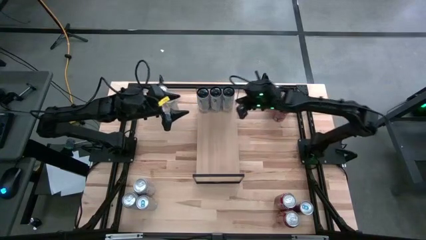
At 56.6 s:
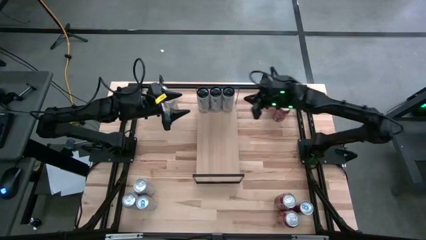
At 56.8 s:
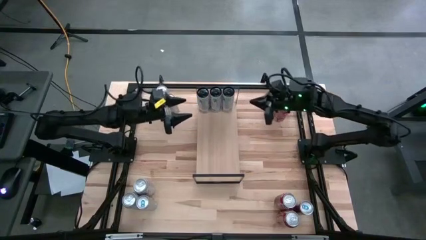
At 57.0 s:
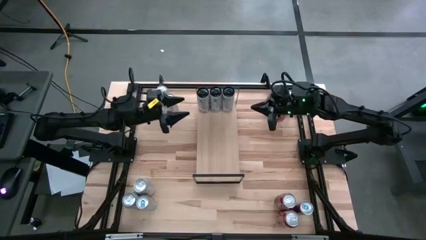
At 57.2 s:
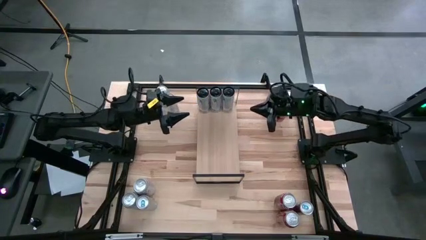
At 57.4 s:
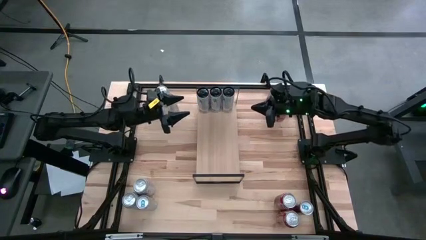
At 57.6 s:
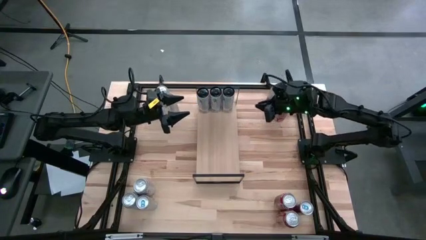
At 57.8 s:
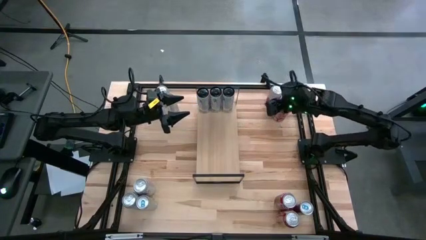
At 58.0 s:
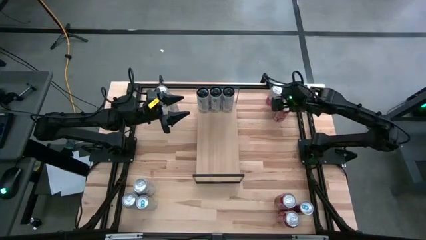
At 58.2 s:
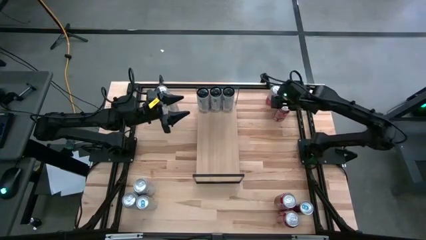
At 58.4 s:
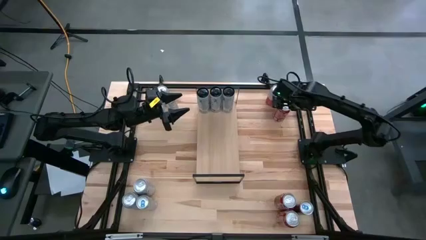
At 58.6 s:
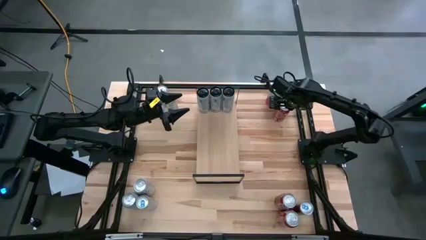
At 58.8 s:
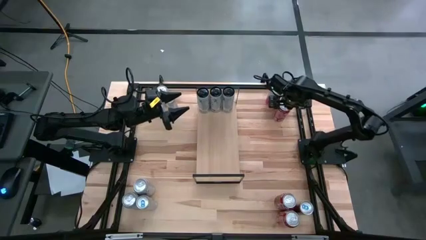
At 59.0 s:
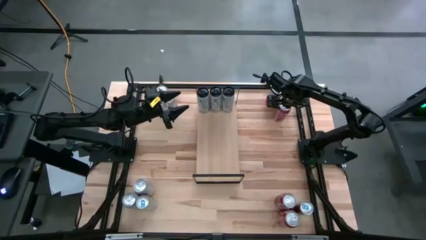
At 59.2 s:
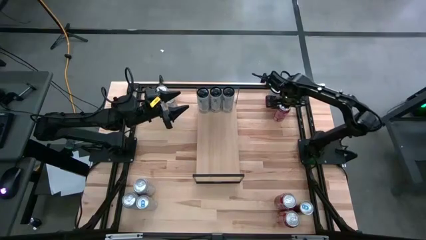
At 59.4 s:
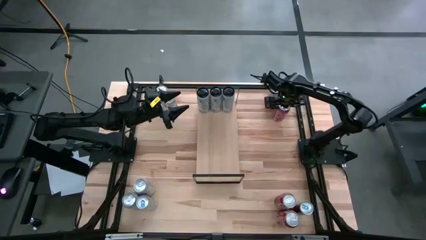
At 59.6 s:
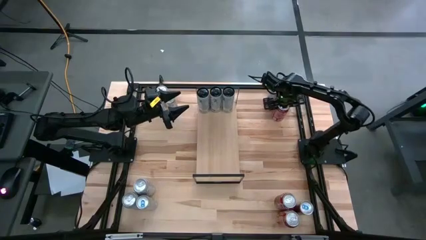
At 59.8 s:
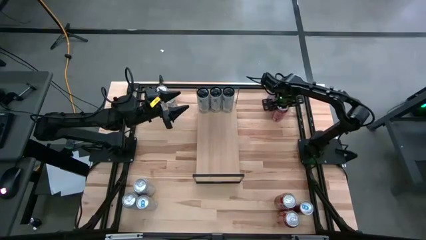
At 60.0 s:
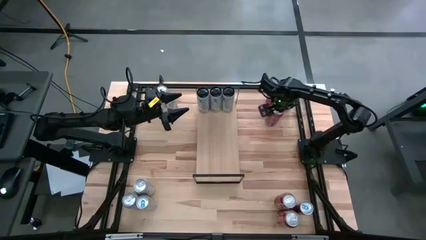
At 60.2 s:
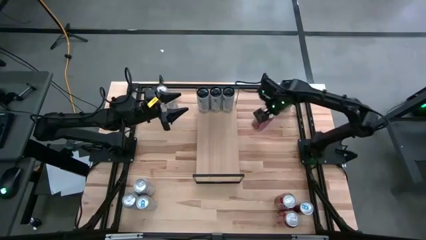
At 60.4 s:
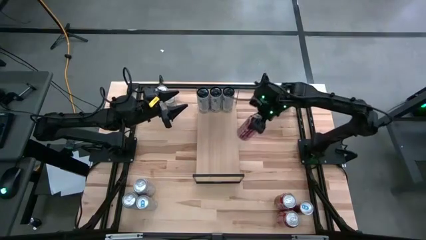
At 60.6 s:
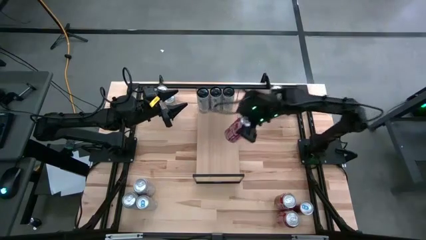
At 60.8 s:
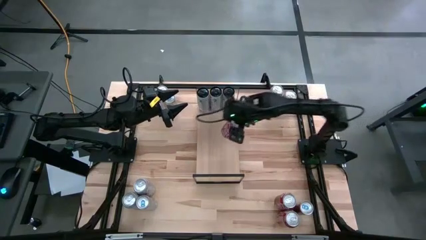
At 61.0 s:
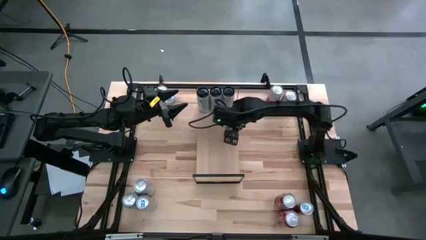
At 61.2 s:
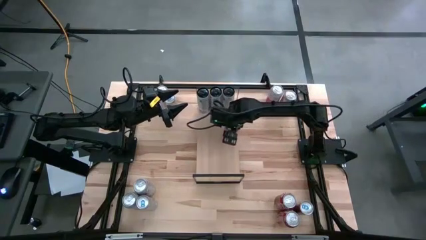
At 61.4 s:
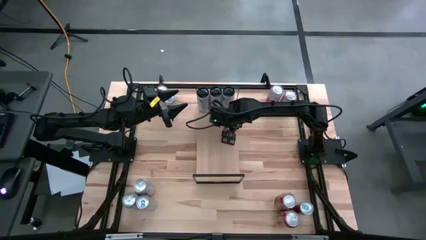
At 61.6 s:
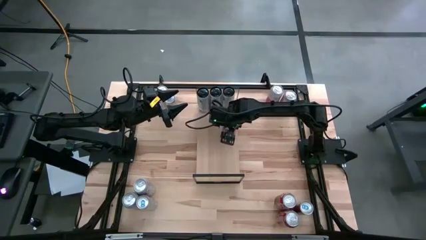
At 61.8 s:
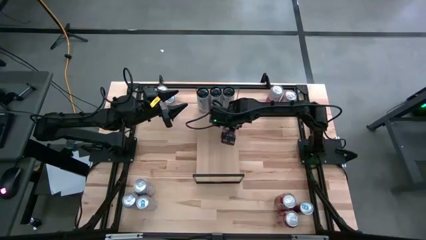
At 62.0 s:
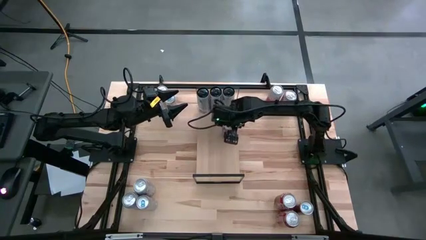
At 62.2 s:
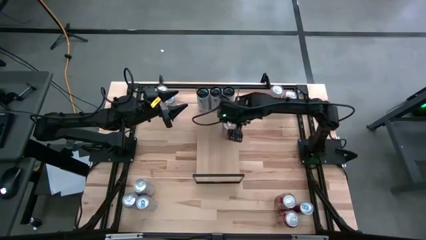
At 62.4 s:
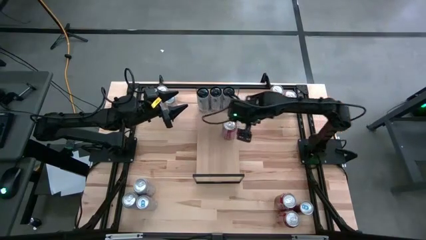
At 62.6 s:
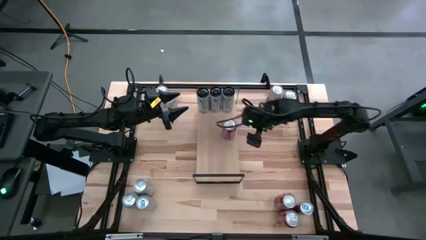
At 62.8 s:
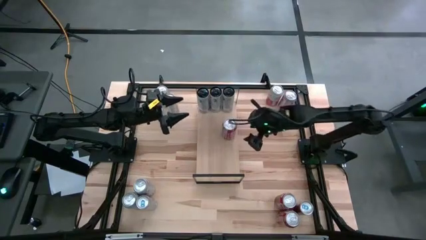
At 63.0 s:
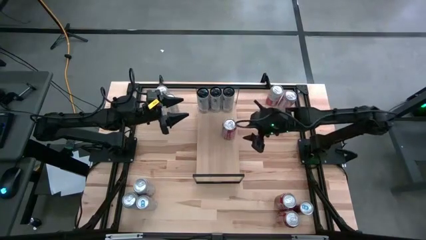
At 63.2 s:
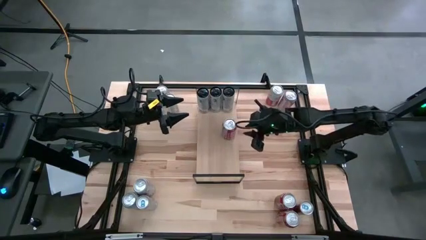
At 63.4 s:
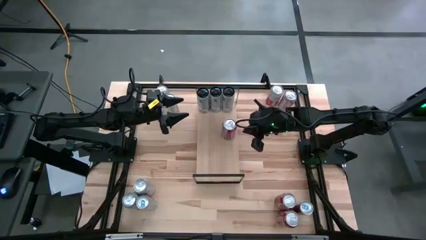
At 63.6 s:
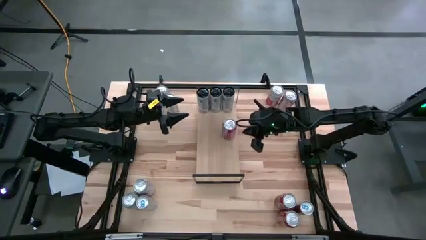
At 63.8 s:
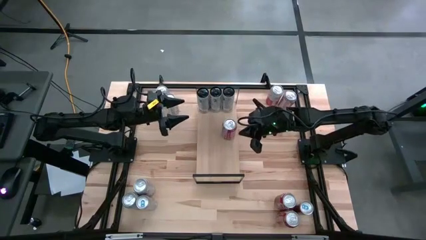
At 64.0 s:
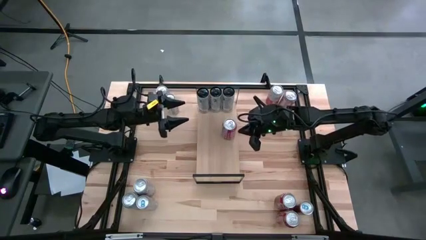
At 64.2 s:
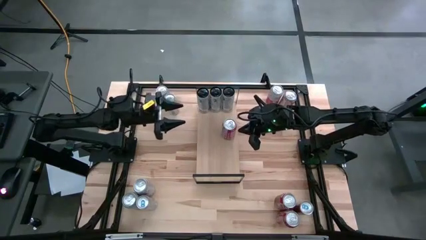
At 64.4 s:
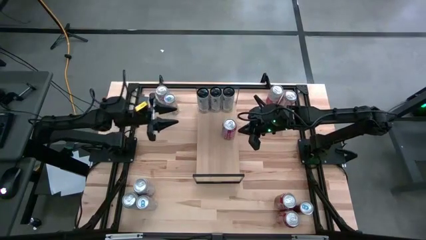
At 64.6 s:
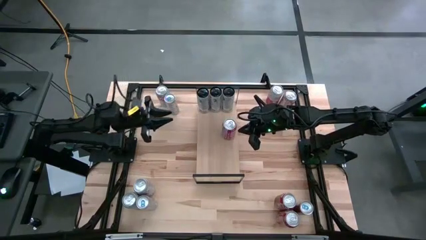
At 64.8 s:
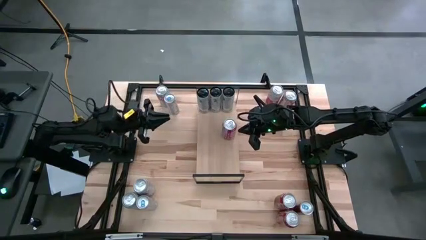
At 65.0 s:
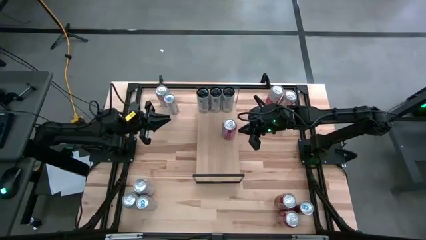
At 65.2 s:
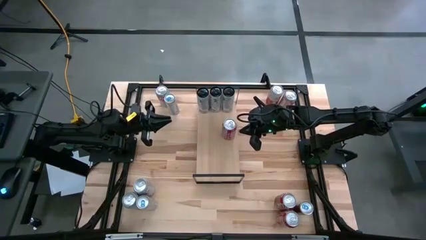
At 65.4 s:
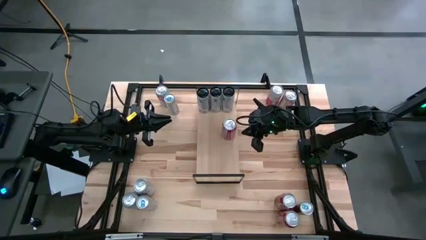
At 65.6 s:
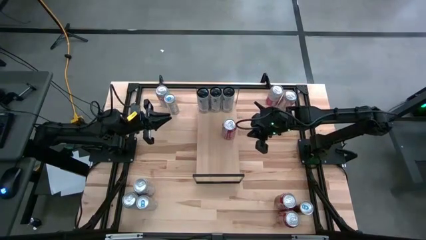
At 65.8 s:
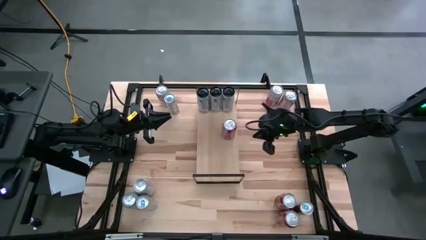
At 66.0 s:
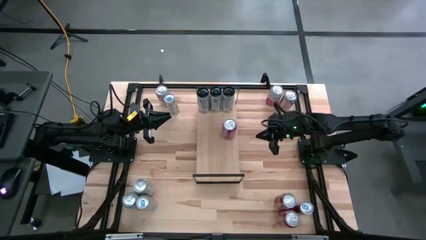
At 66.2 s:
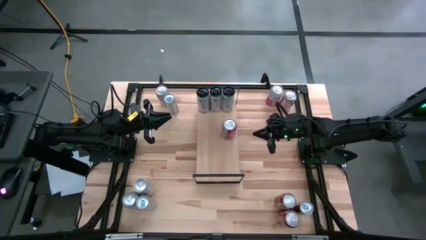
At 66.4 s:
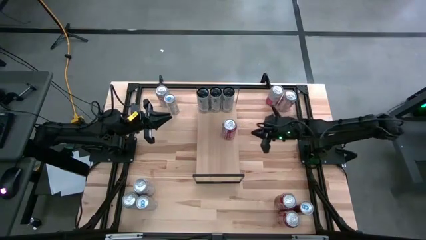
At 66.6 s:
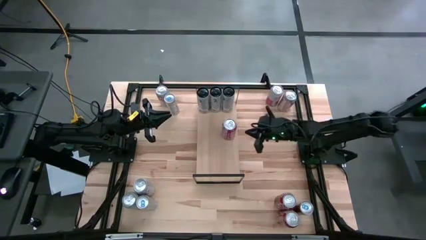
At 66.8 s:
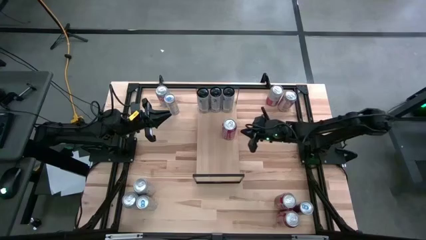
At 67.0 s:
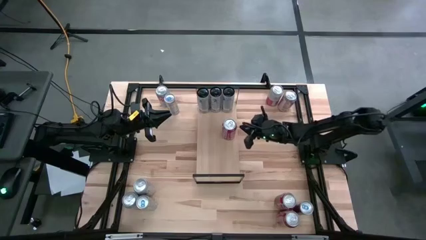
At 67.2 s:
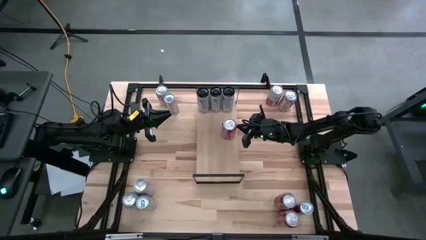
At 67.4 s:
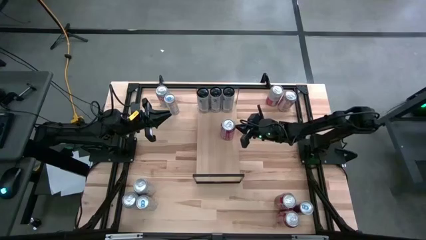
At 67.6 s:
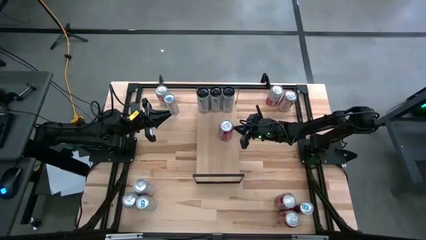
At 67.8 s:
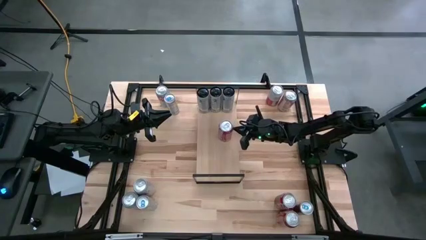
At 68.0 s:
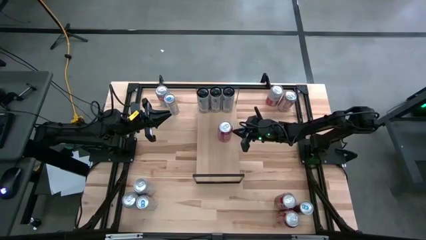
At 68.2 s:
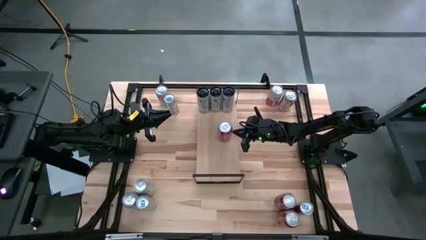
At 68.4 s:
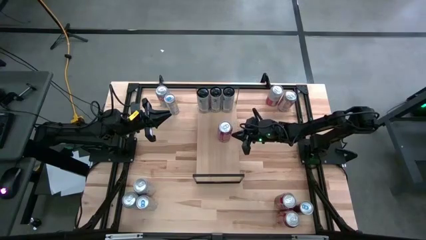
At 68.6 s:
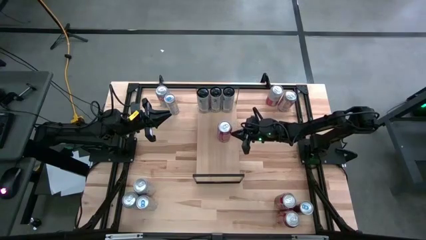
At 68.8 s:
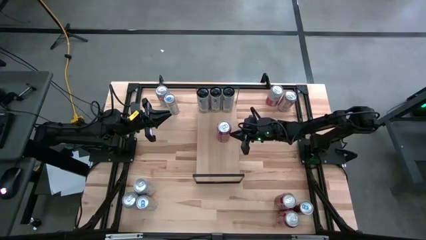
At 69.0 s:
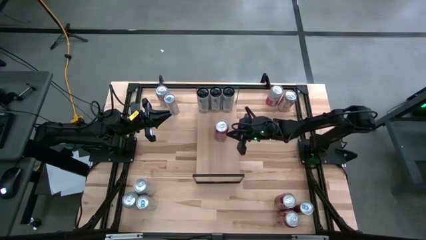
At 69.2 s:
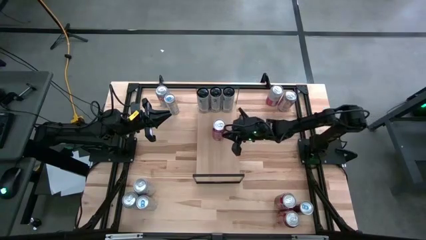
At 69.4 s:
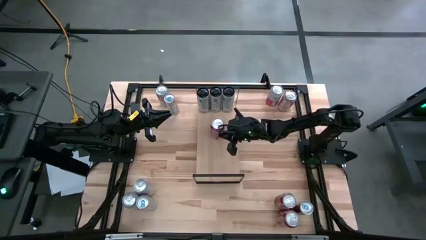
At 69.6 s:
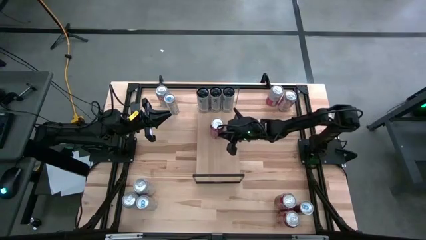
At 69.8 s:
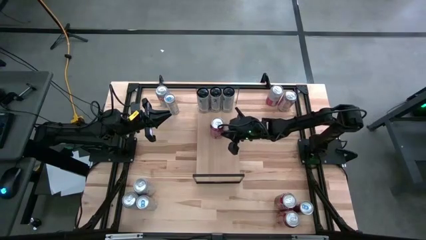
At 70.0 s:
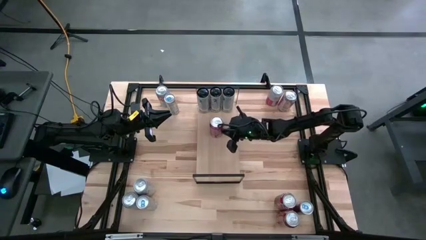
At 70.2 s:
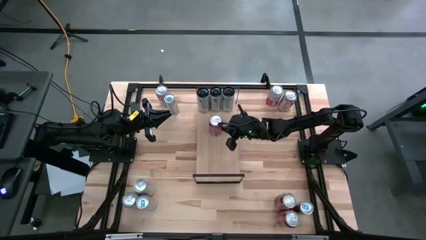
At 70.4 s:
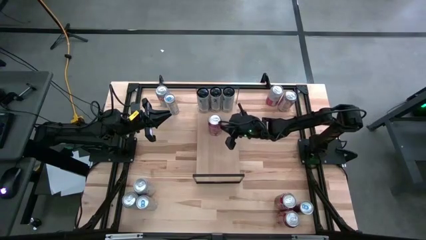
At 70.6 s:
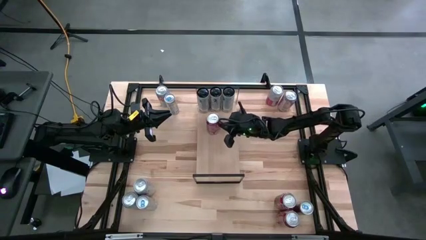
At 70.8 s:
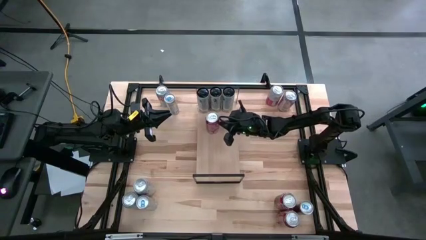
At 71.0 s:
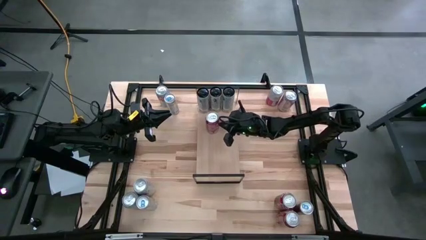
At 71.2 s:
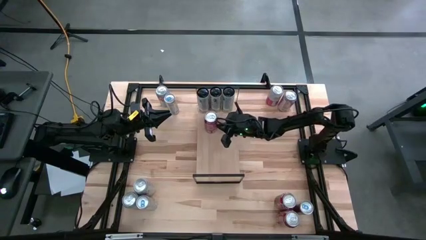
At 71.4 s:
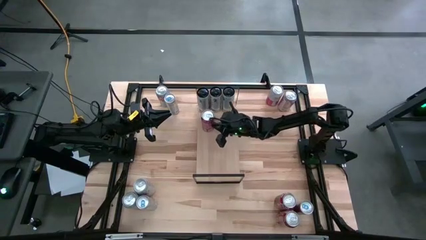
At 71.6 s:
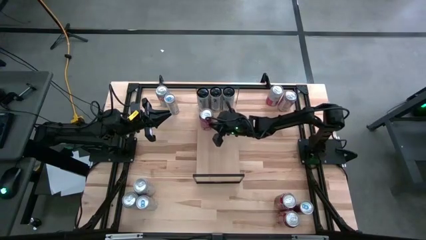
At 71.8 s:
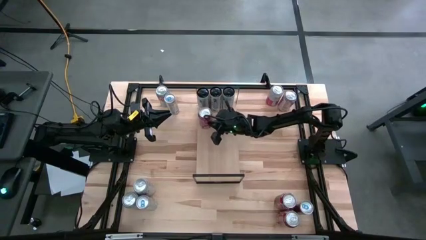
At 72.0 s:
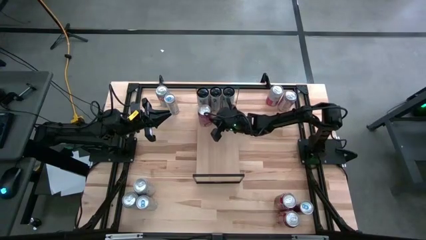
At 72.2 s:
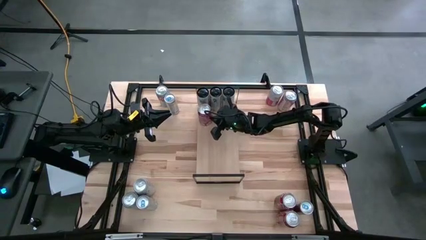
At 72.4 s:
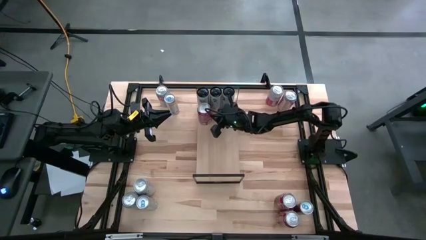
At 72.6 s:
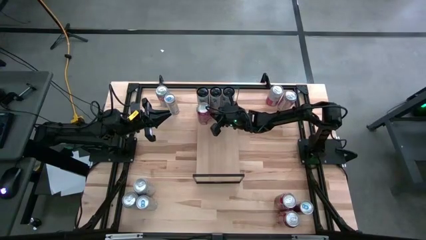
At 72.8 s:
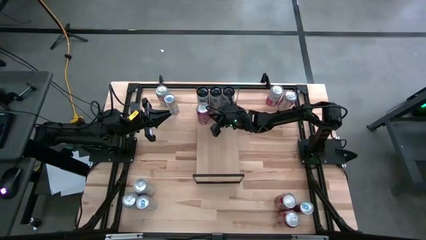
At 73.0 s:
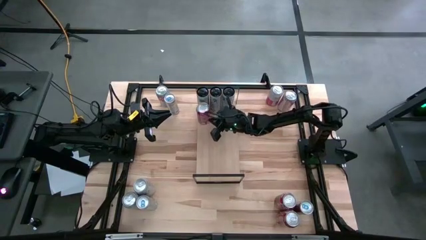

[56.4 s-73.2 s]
Task: Place canned beverage on shelf
Put the top right red-white soda can on the shelf
